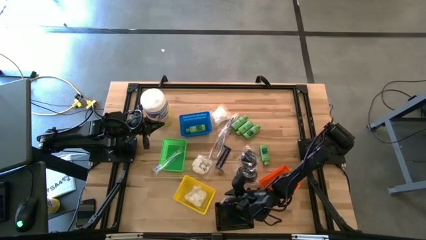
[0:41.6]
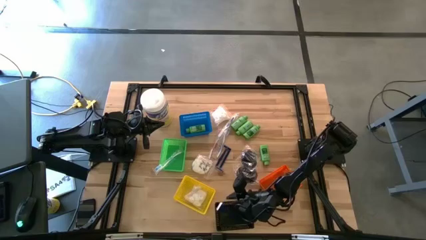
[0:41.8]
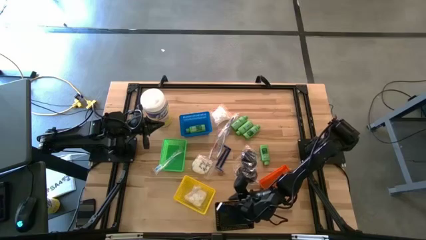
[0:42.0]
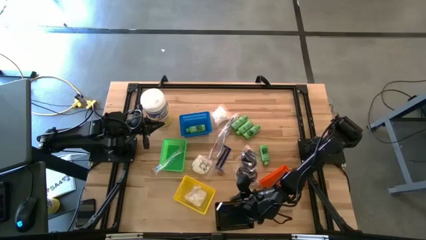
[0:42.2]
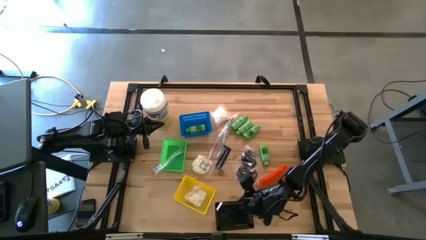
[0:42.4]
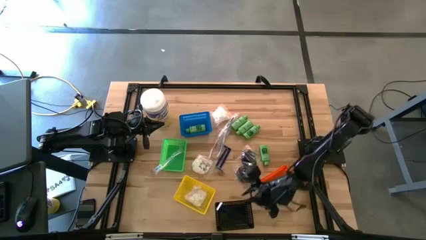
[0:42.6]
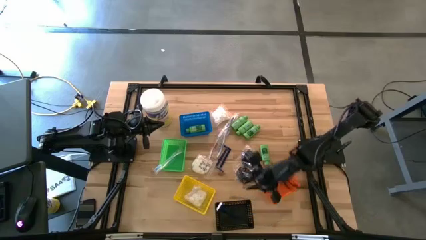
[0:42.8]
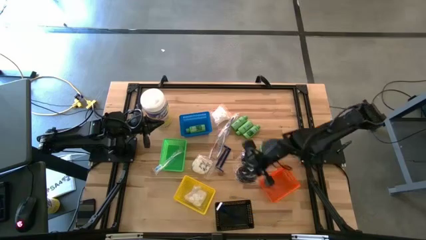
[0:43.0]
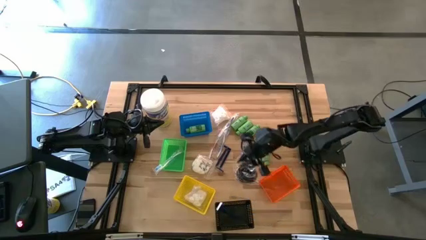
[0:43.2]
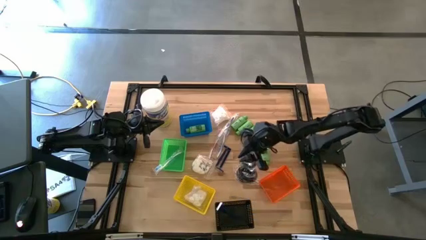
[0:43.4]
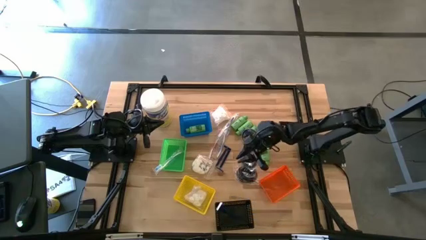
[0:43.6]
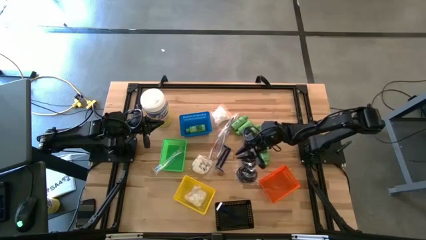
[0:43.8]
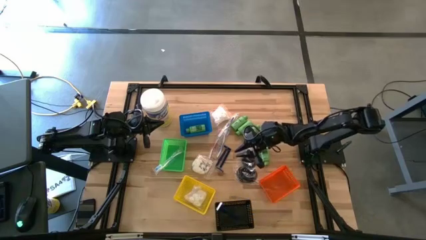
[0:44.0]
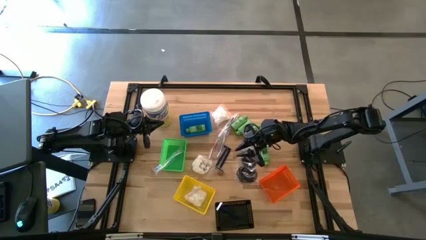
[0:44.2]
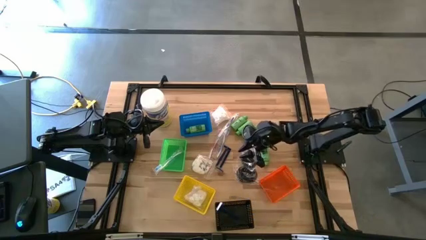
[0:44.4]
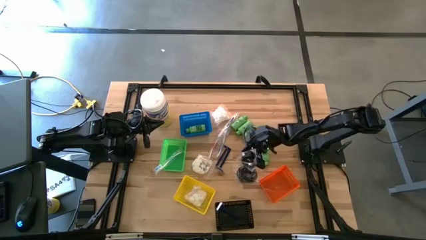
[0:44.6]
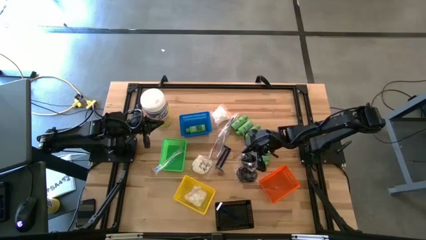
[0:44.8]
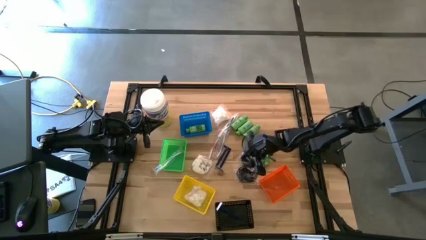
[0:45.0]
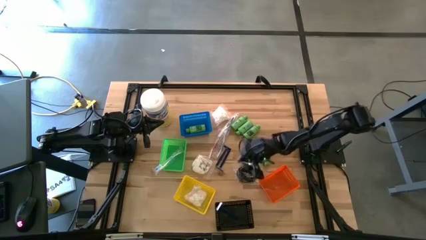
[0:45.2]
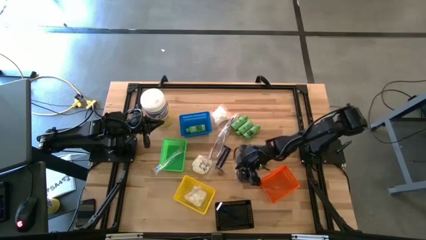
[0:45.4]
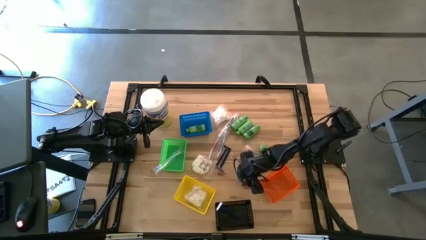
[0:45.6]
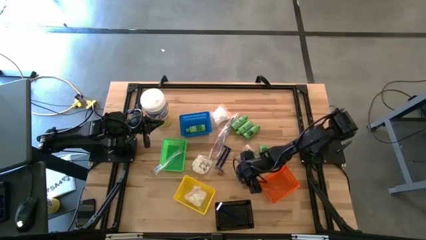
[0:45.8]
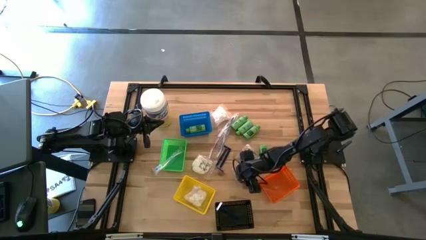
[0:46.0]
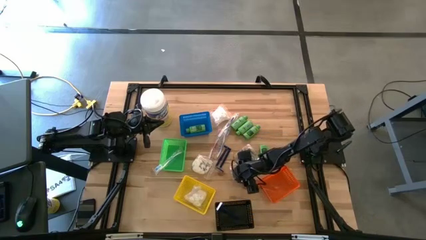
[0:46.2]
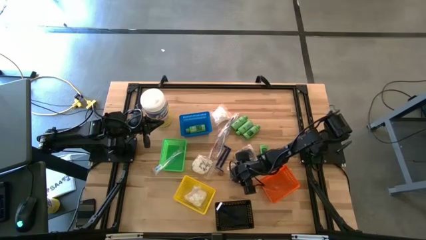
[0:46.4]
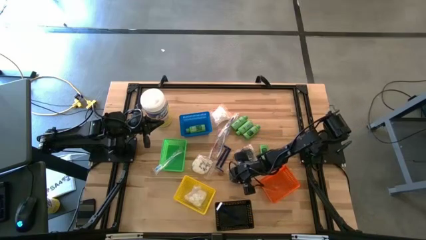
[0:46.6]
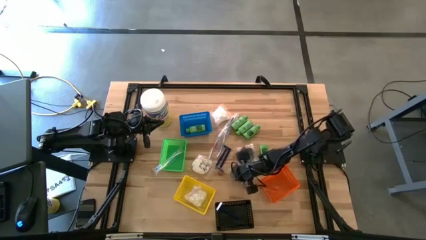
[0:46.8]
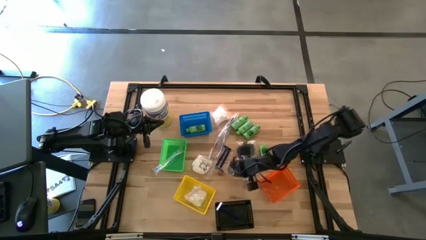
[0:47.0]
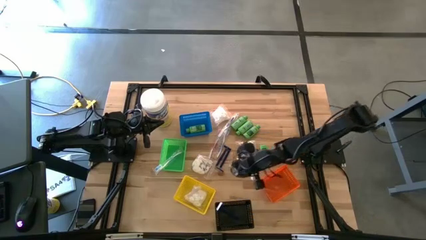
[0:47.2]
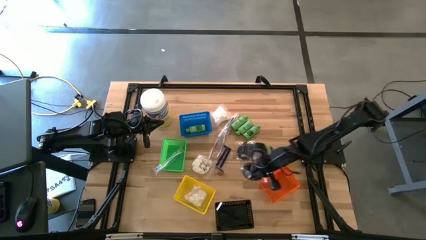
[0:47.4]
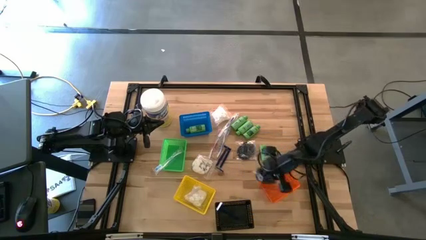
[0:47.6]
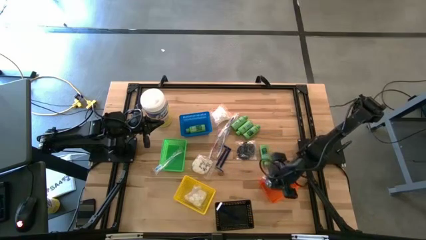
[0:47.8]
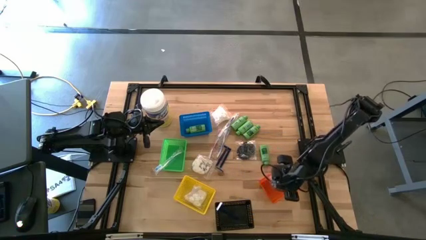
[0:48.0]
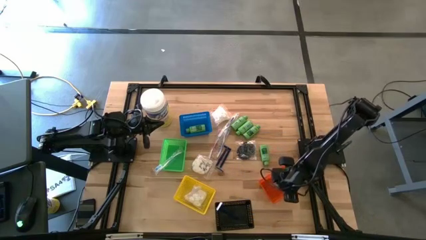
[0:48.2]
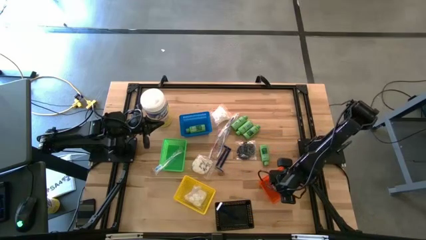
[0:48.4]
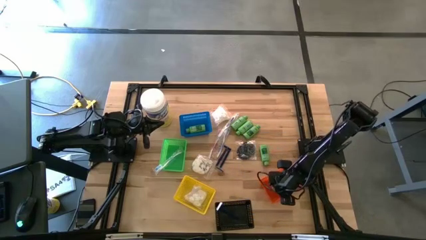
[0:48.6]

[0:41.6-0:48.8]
Task: Pick & Place Travel size toiletries
Put the black hairbrush into the orange bin

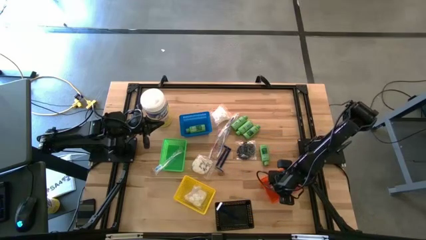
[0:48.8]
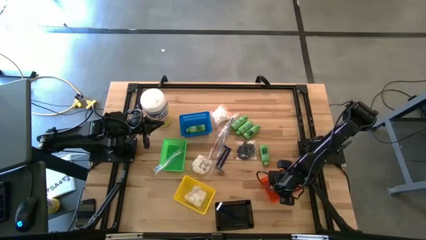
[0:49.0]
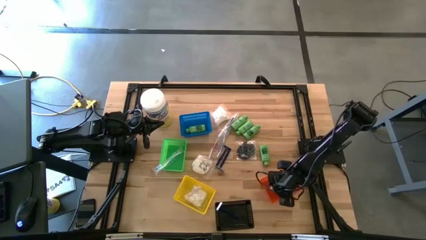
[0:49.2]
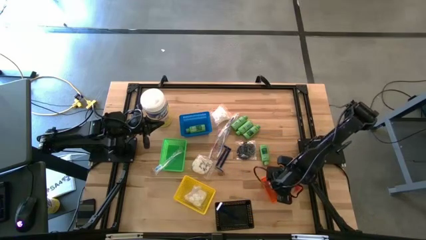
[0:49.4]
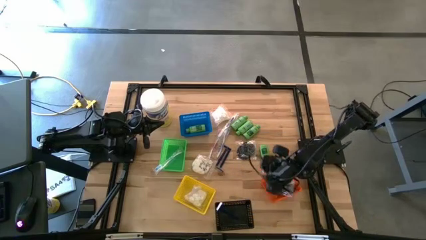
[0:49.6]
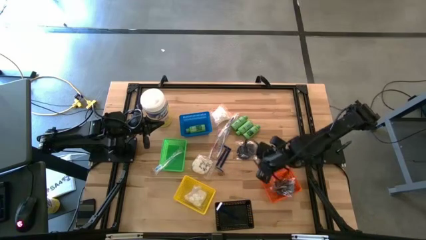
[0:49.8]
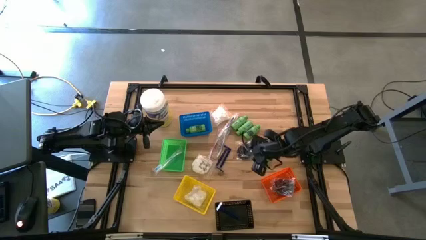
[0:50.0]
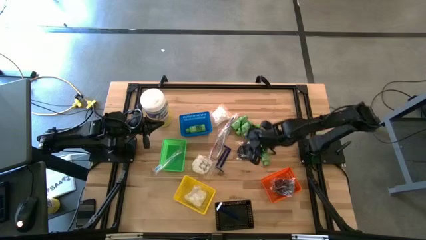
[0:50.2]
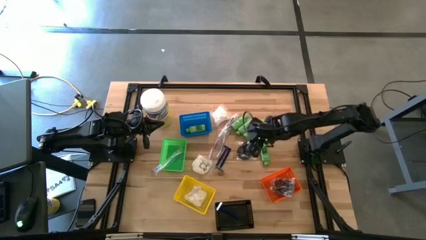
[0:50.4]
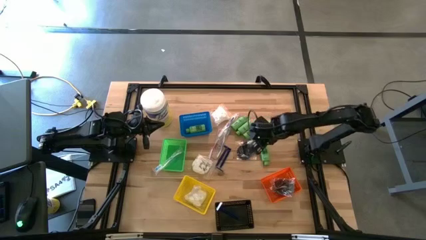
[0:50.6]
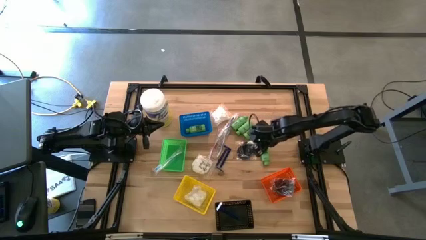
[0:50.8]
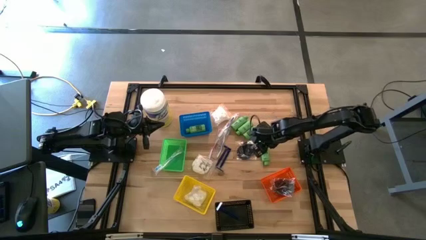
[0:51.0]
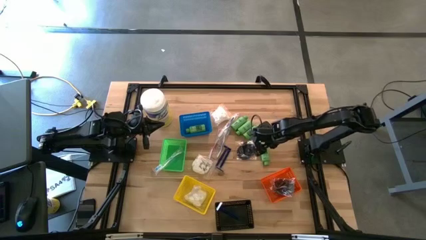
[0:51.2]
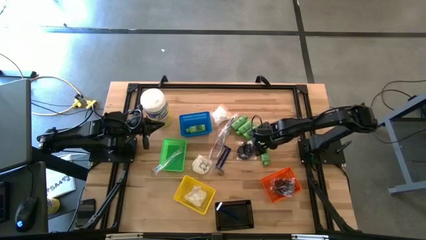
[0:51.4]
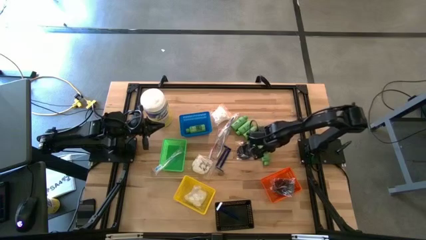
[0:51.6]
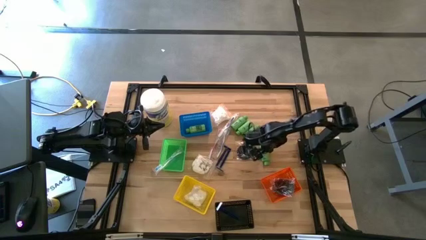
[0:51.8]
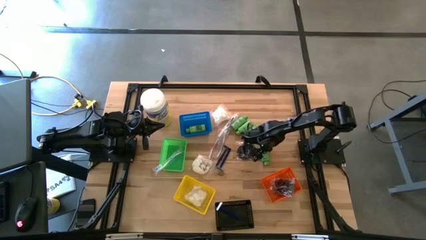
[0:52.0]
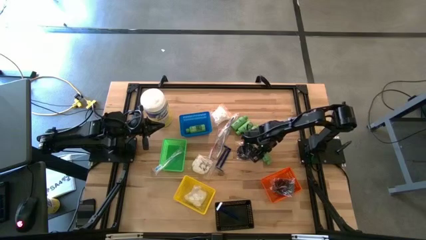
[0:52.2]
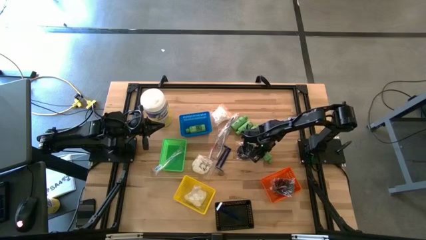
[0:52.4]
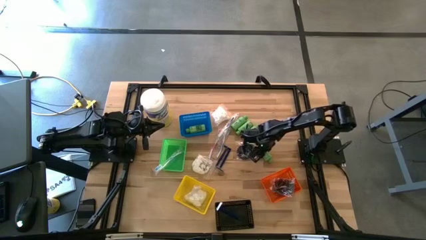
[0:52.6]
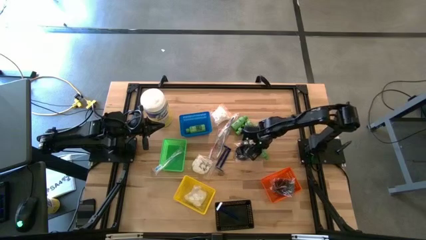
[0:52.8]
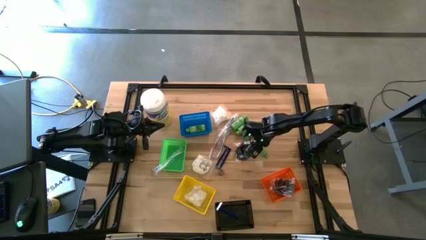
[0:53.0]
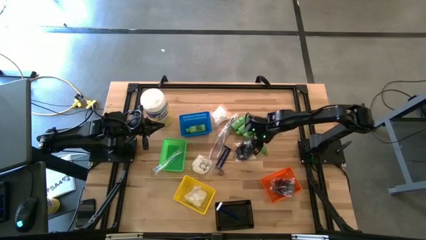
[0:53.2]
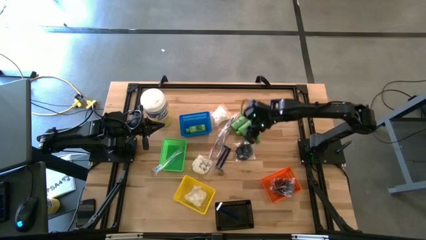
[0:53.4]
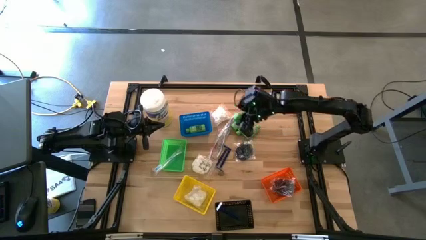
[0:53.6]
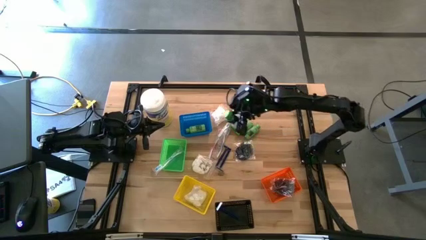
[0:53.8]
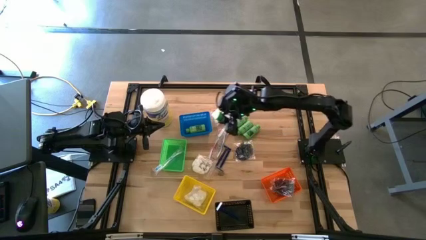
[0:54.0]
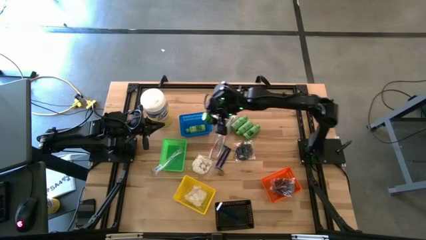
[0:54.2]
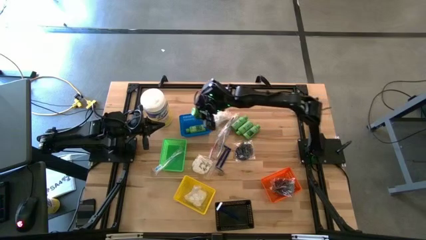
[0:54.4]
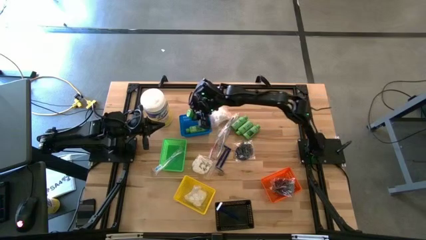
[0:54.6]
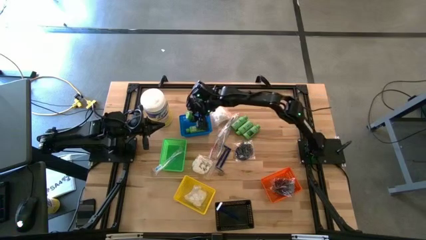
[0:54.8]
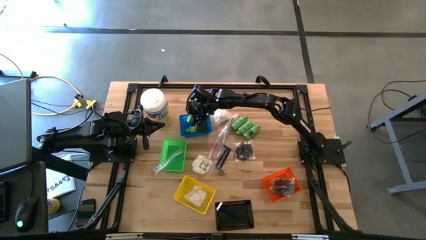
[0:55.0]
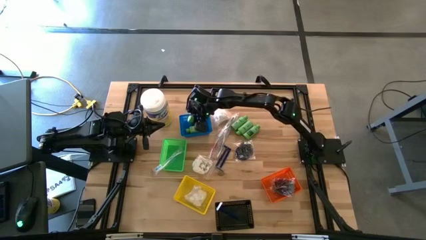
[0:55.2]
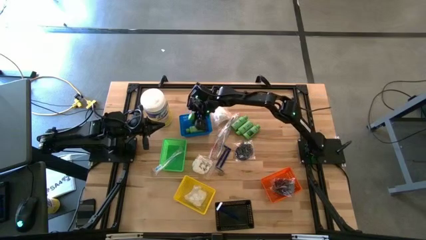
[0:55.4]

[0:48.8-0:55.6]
Put the green shampoo into the blue bin
